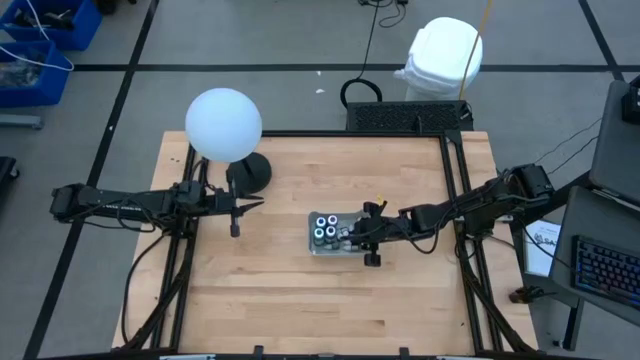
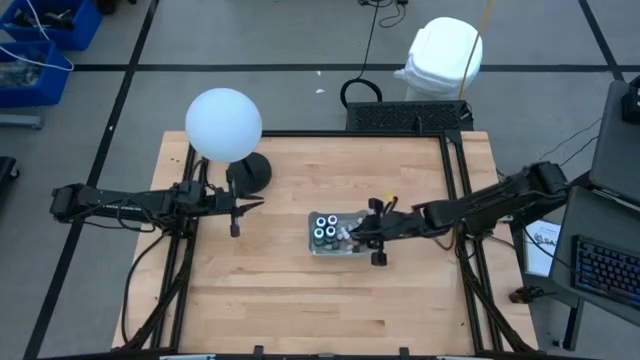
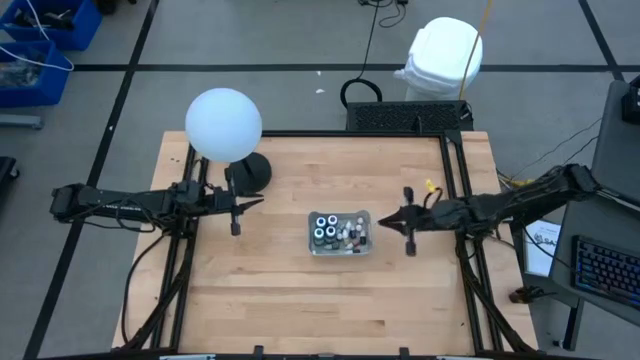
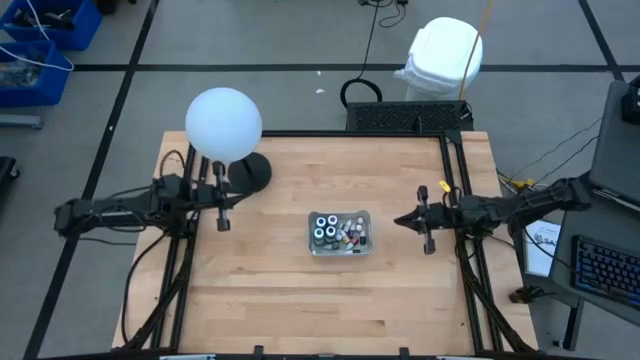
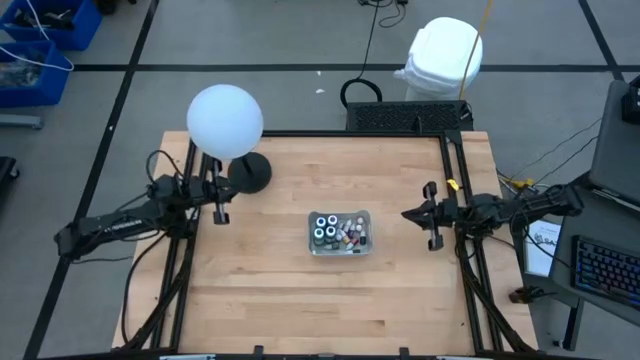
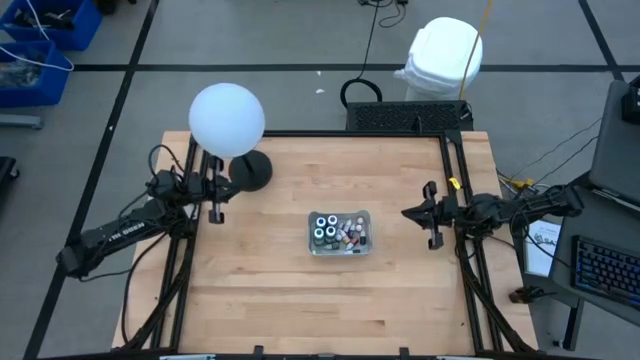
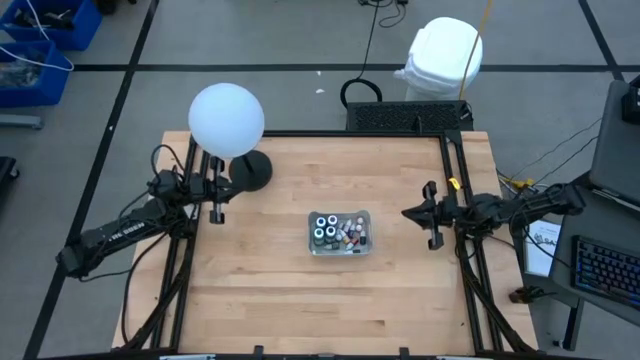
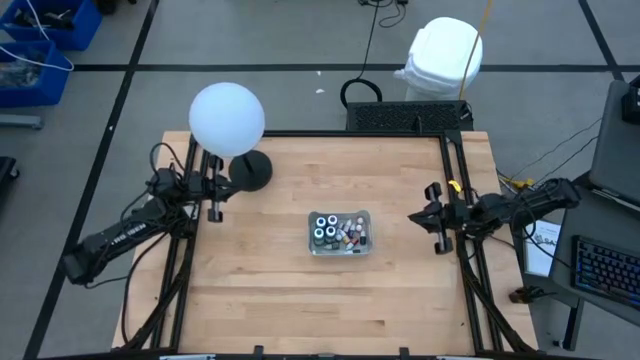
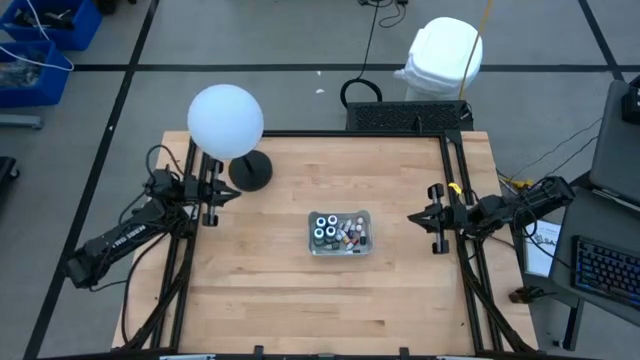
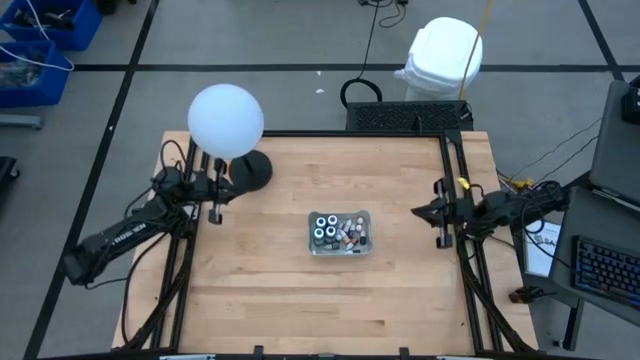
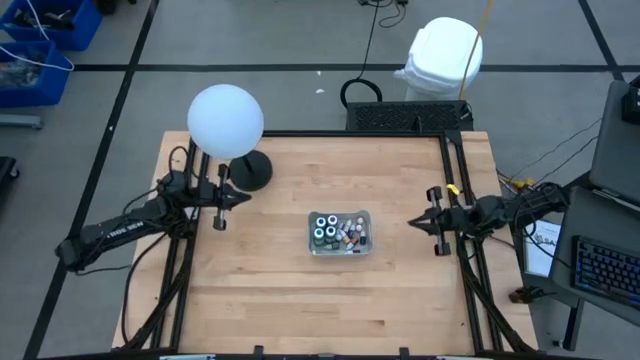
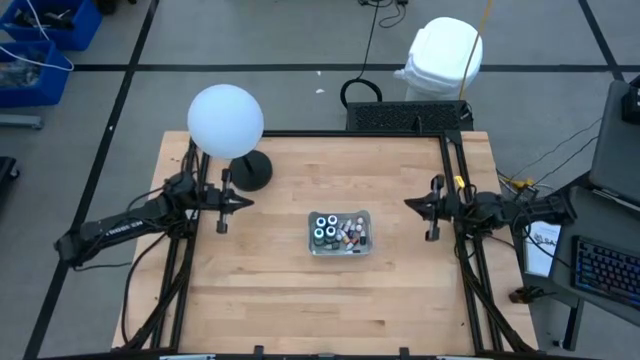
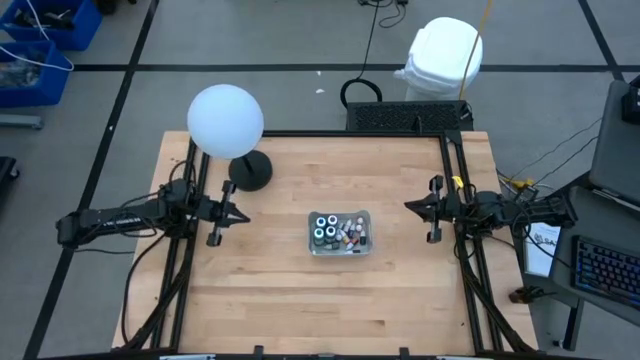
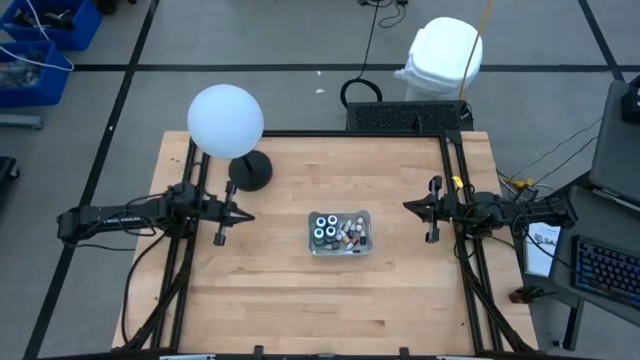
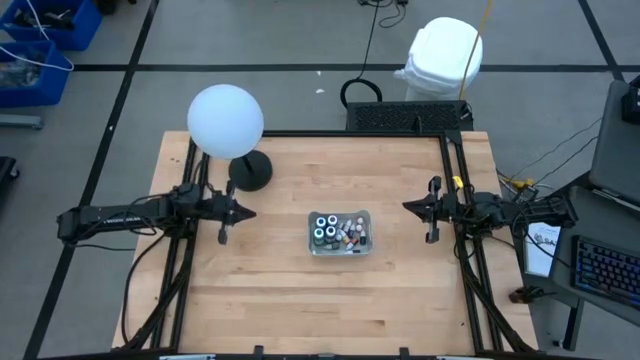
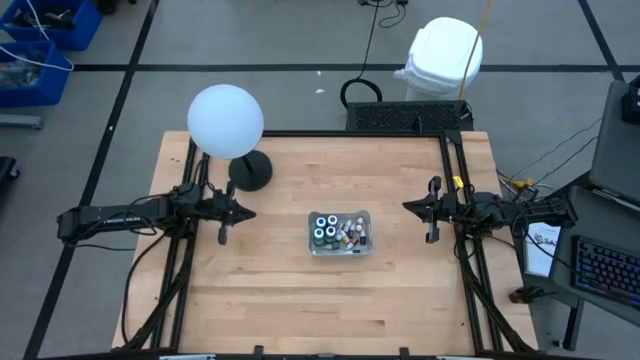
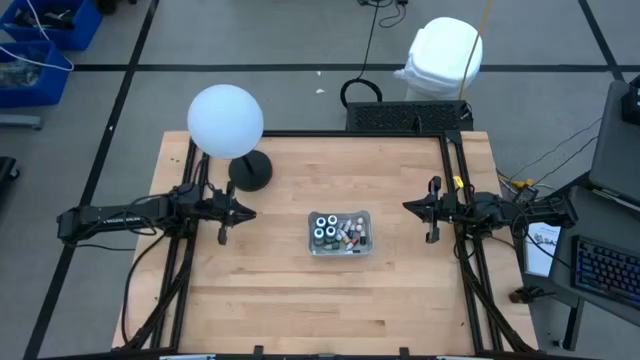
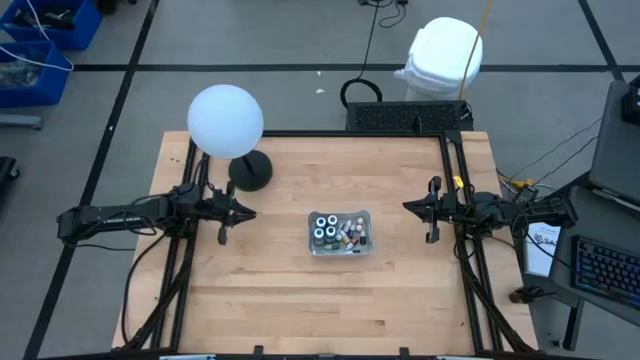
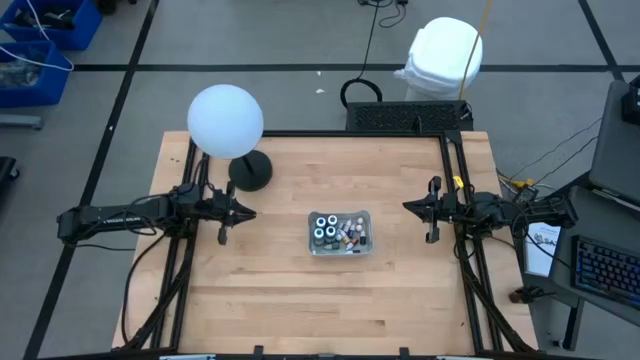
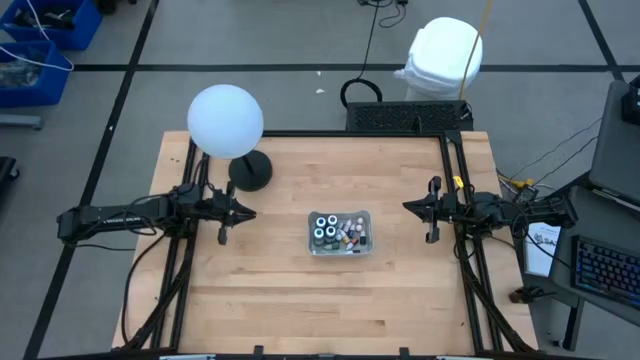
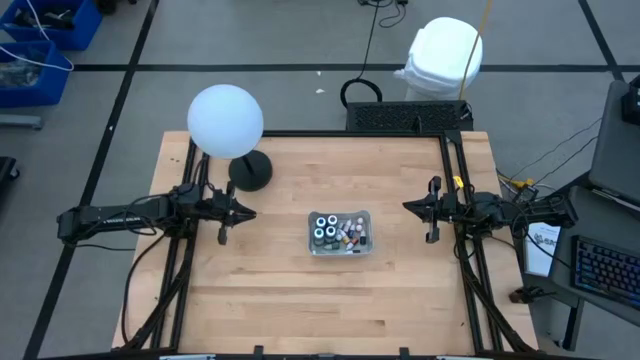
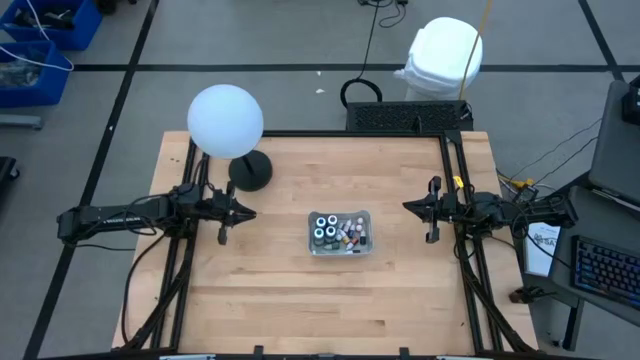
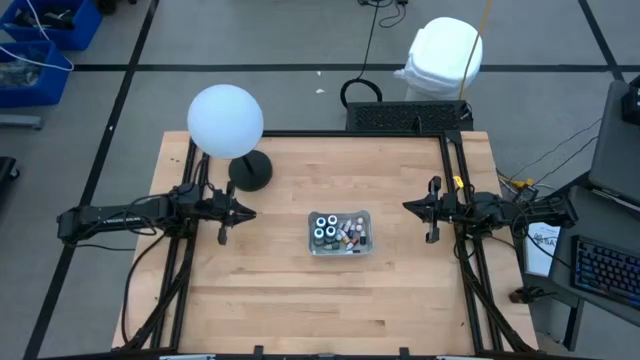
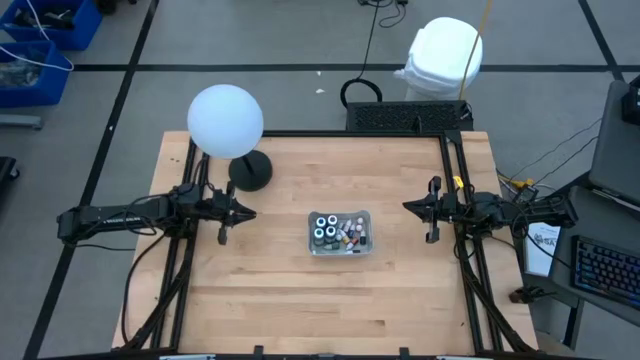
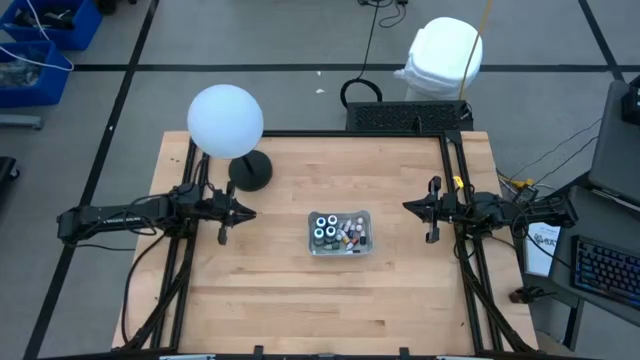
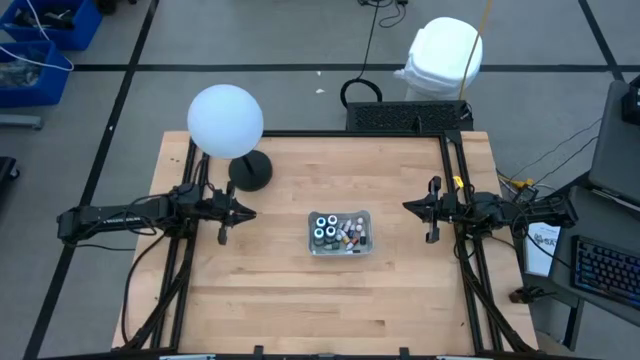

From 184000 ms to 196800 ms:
Task: Pick & Place food coloring
Return to Home Position

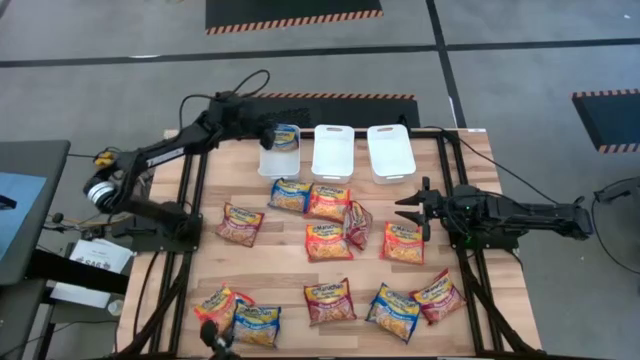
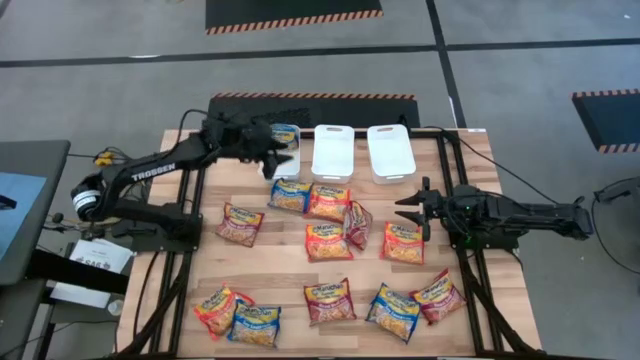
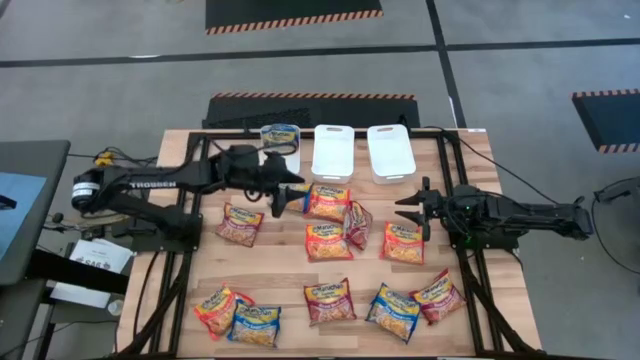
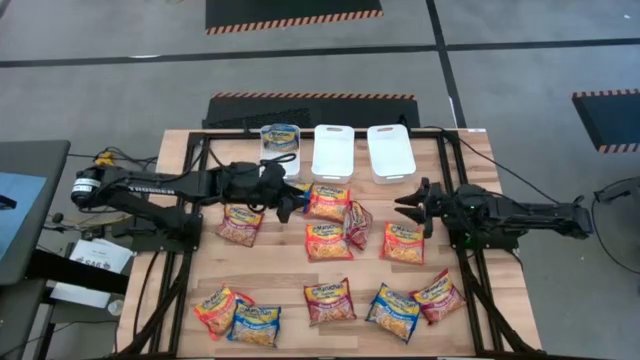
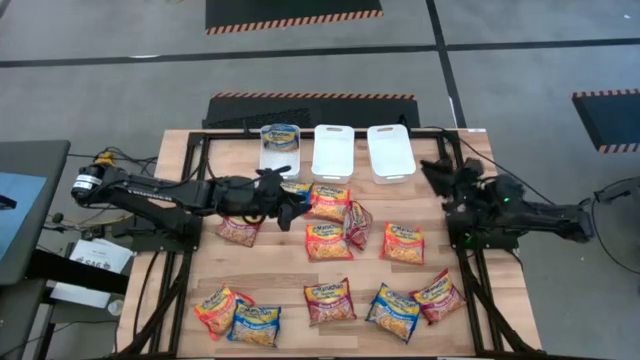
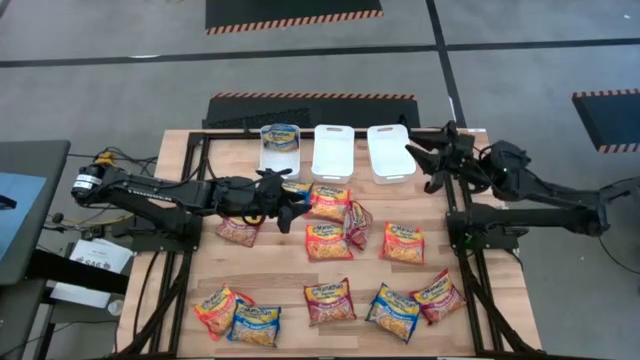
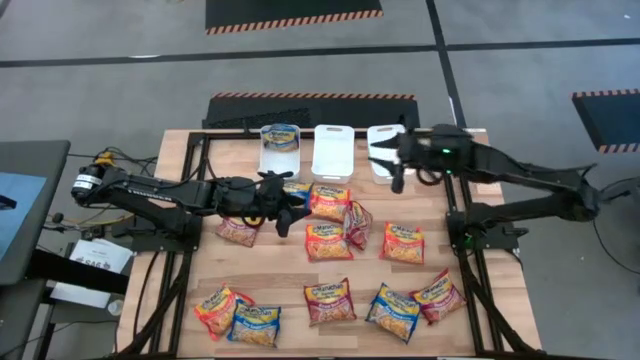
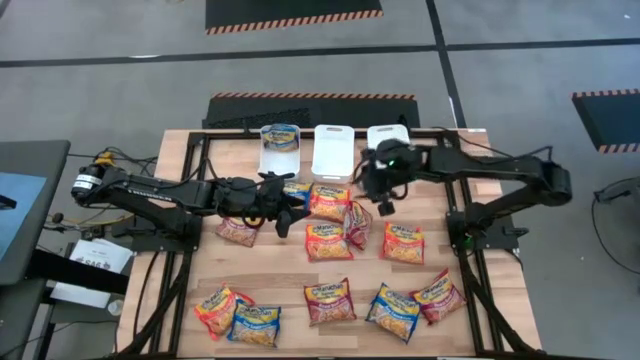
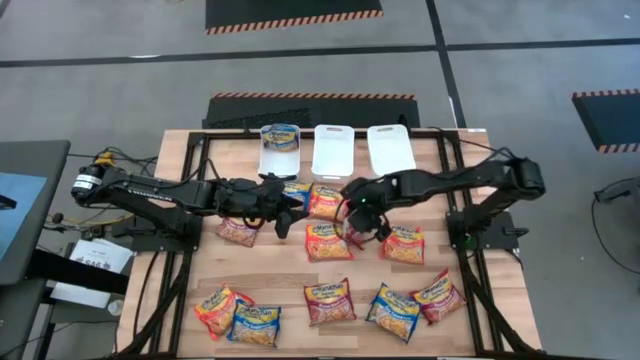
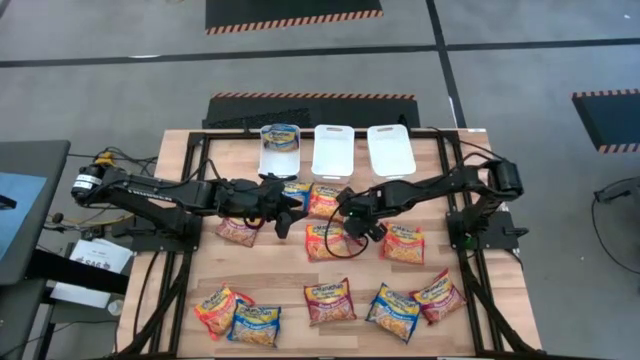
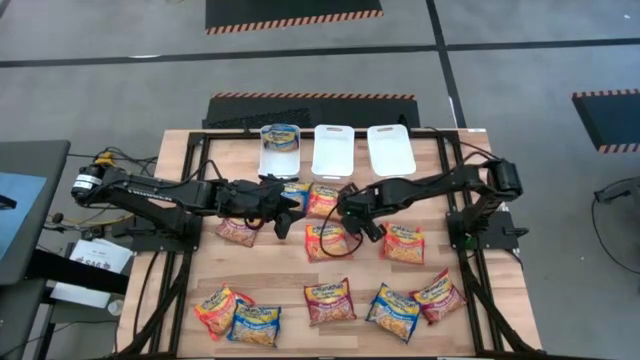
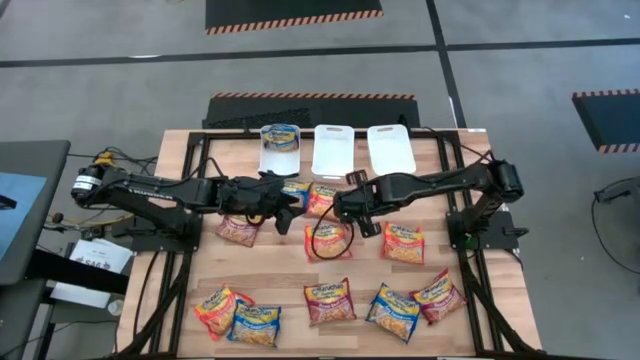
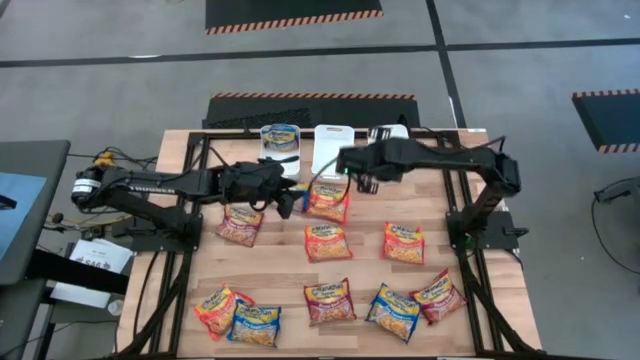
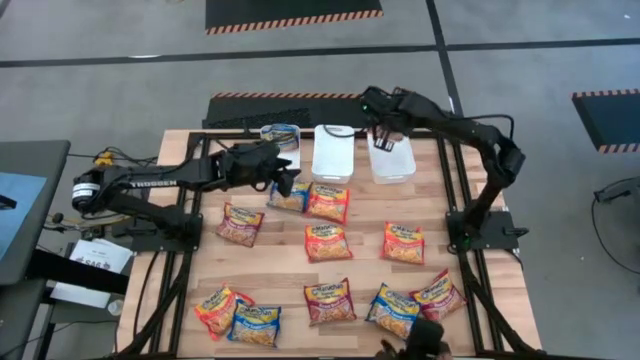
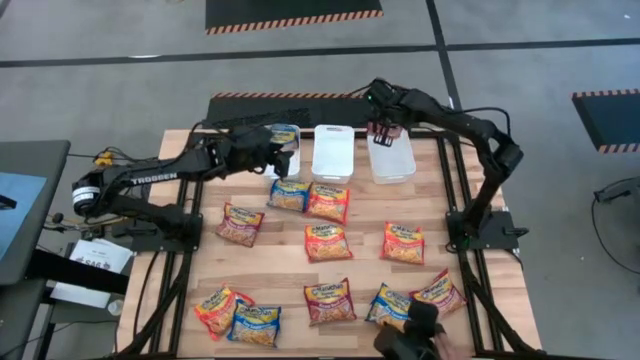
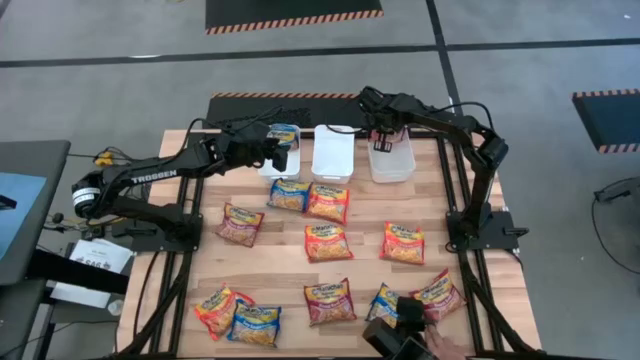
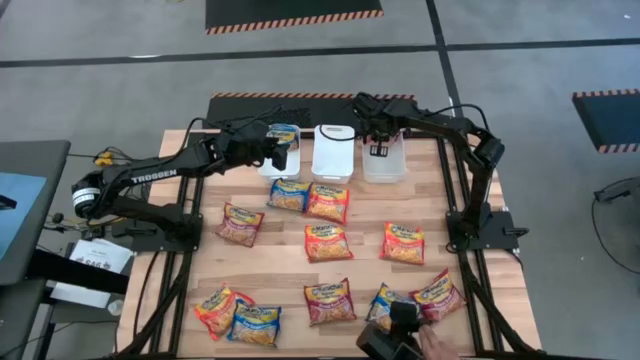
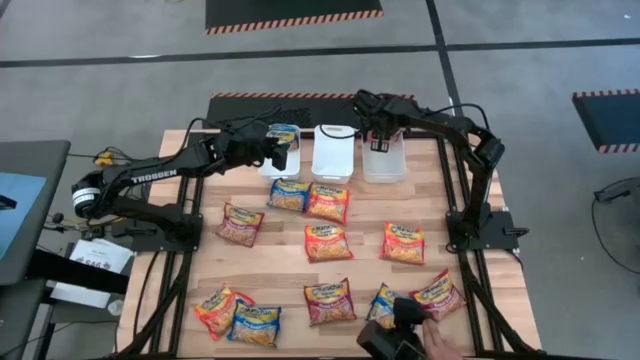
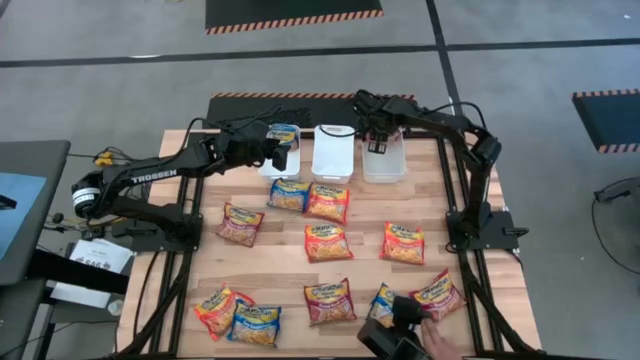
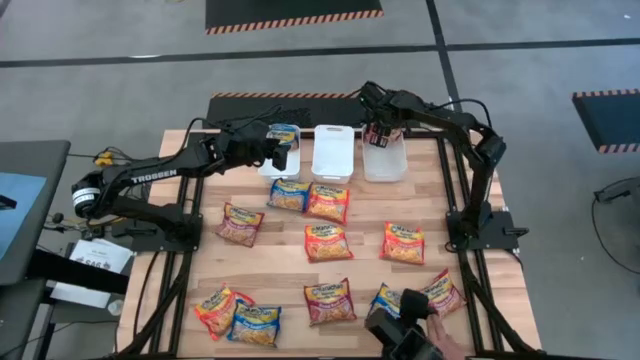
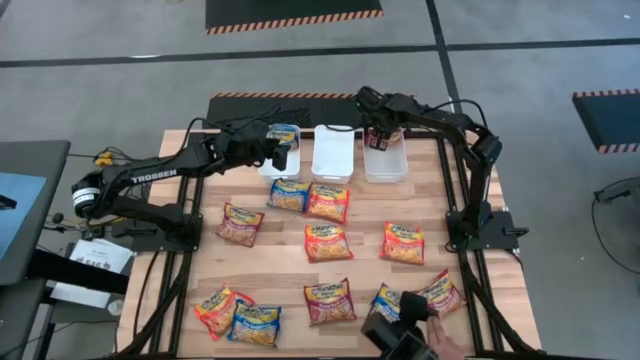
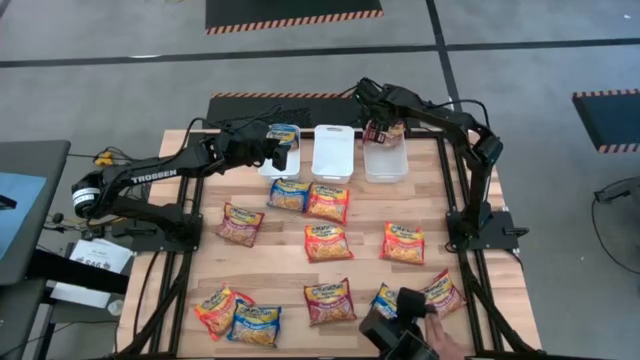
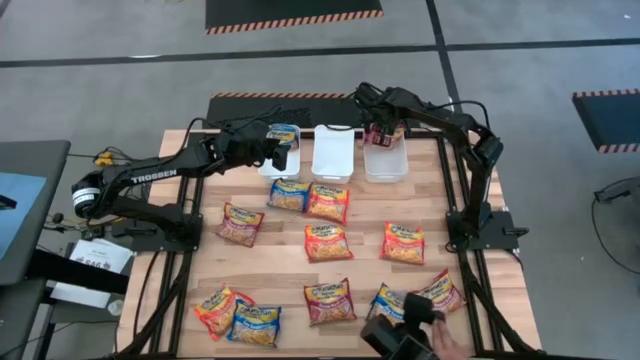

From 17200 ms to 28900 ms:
Task: Sort Maruchan noodles
Put the red noodle pack into the right white bin
